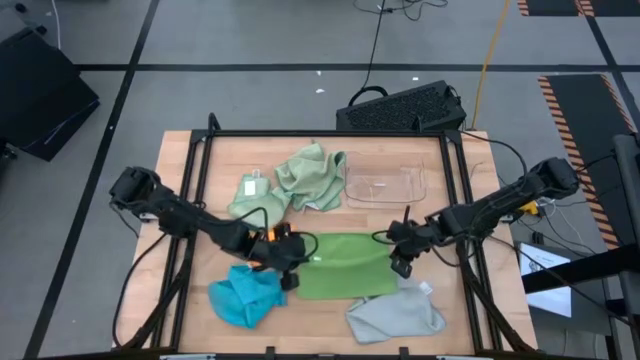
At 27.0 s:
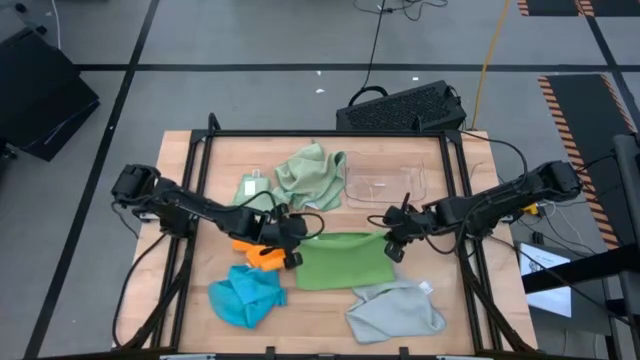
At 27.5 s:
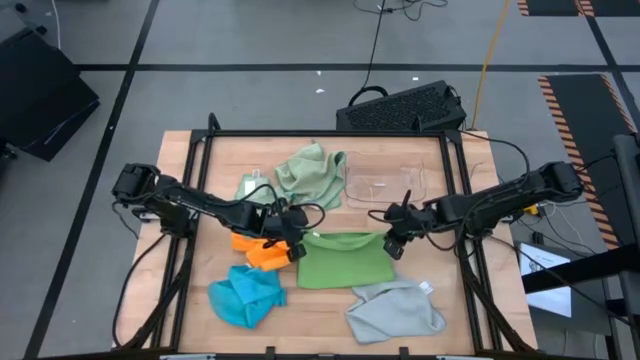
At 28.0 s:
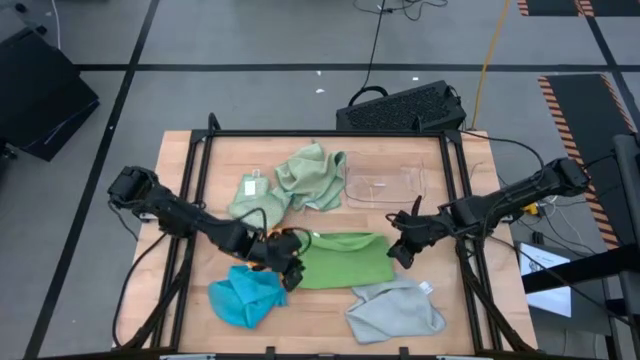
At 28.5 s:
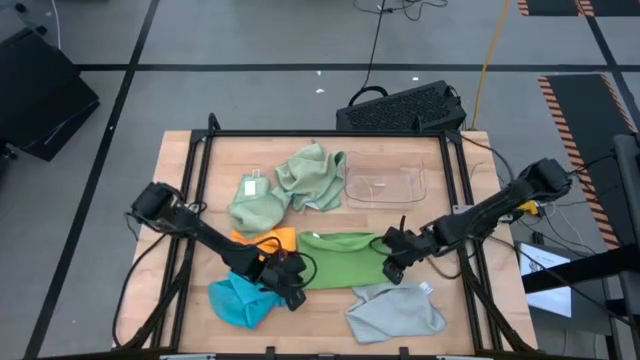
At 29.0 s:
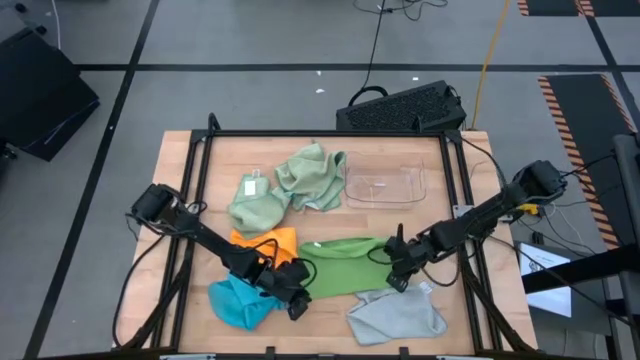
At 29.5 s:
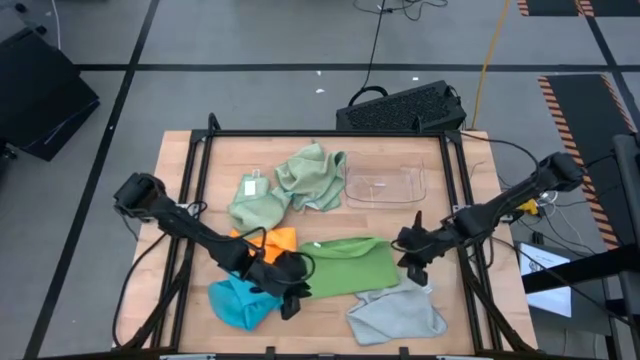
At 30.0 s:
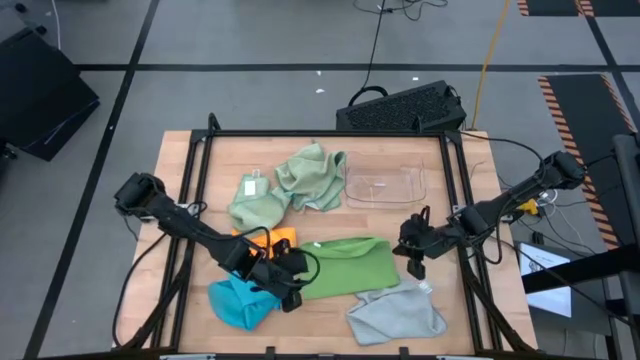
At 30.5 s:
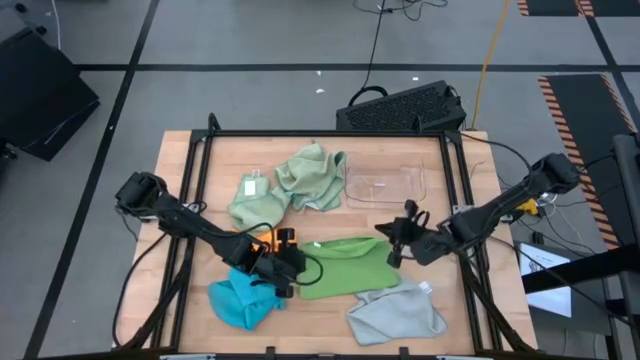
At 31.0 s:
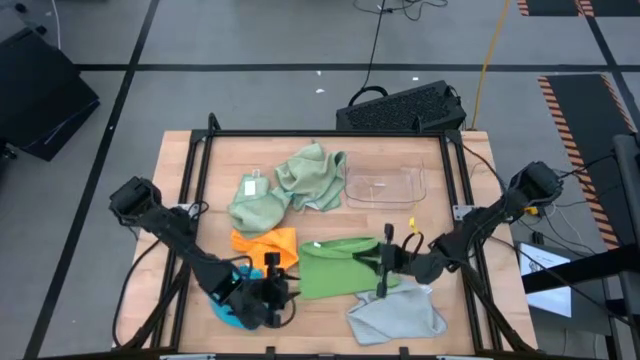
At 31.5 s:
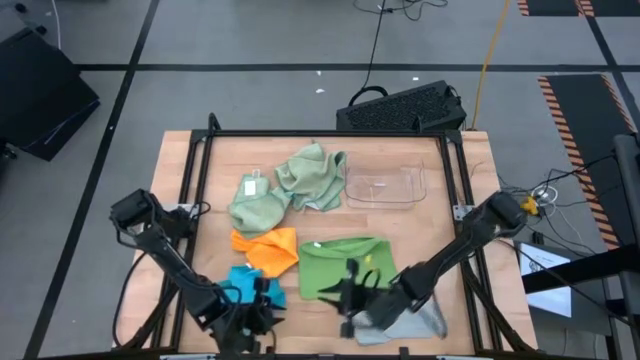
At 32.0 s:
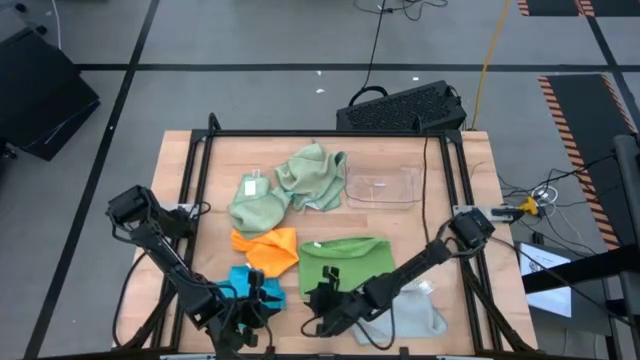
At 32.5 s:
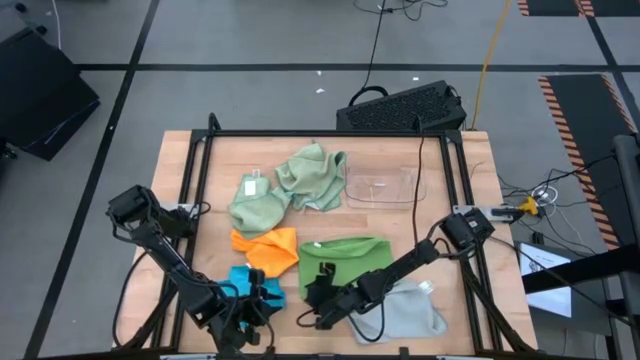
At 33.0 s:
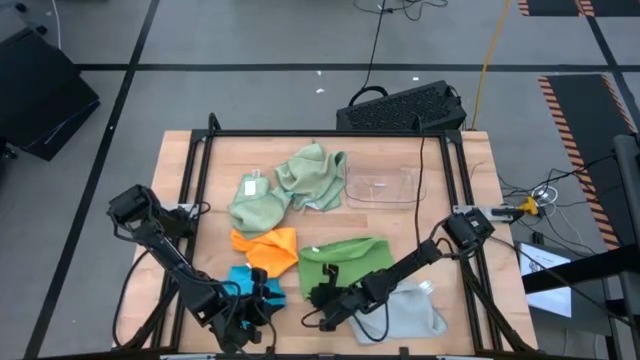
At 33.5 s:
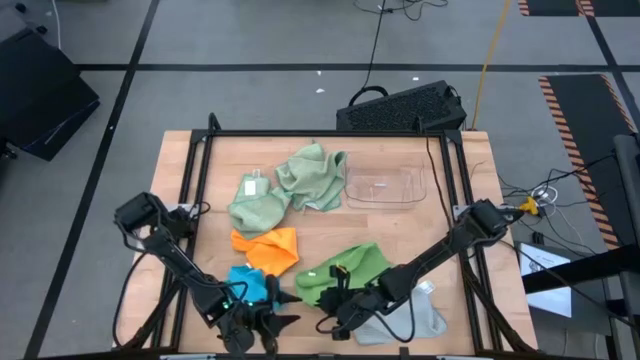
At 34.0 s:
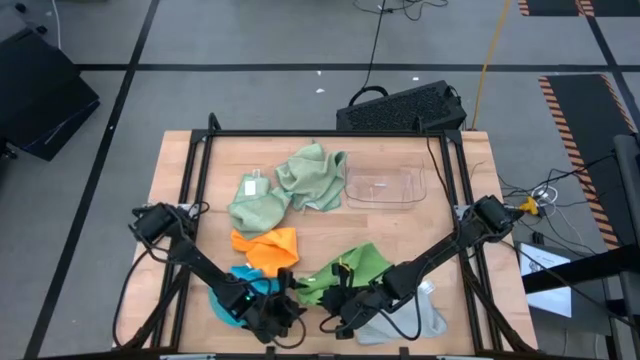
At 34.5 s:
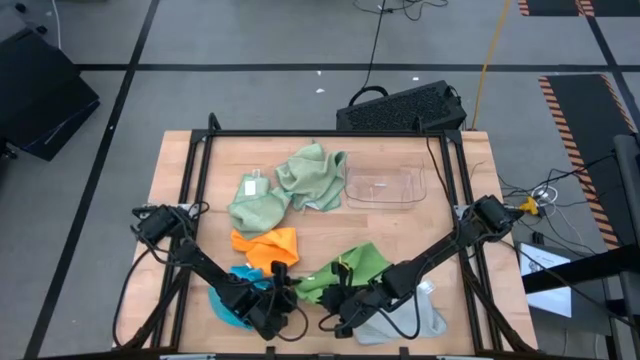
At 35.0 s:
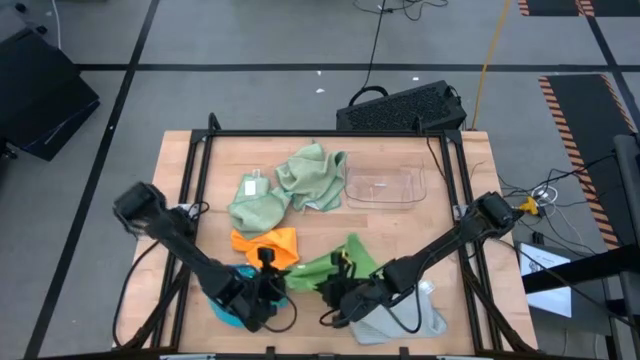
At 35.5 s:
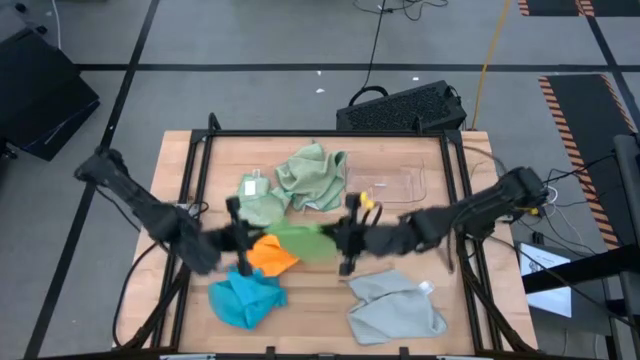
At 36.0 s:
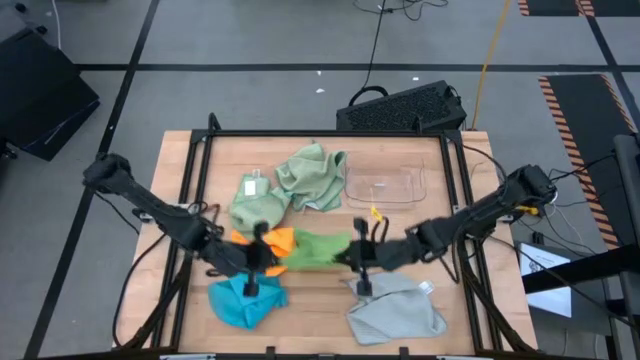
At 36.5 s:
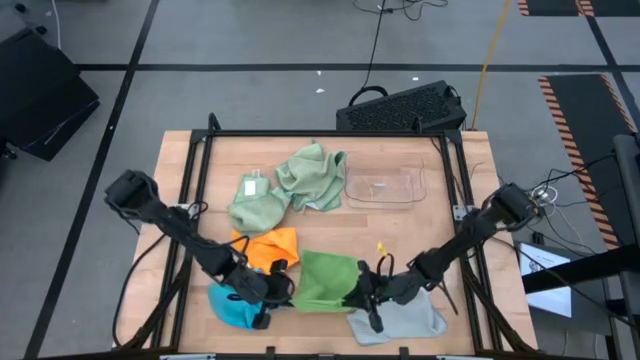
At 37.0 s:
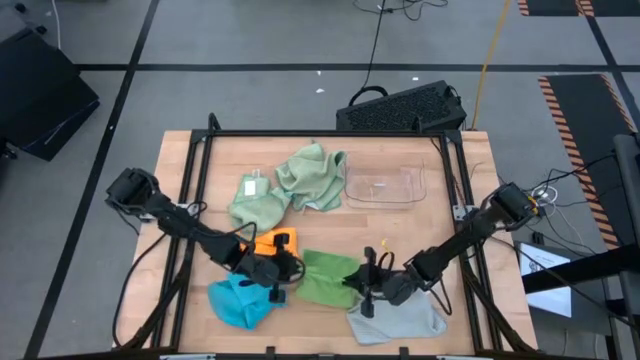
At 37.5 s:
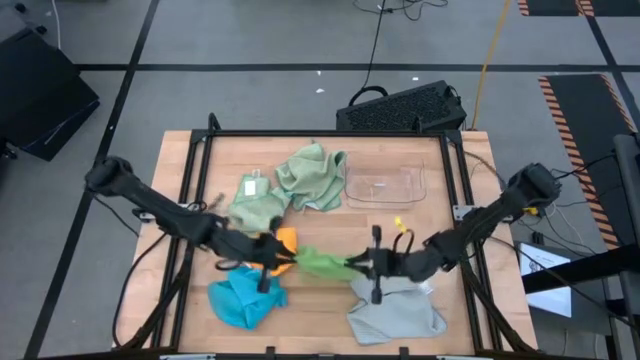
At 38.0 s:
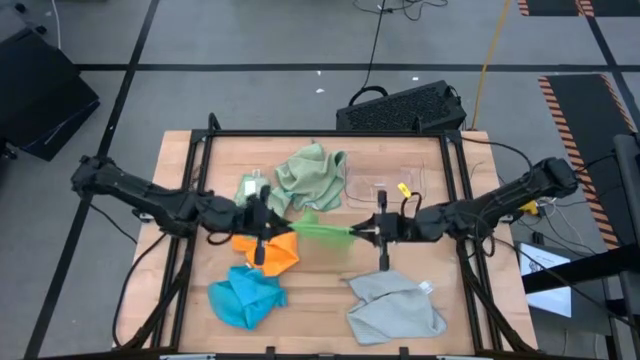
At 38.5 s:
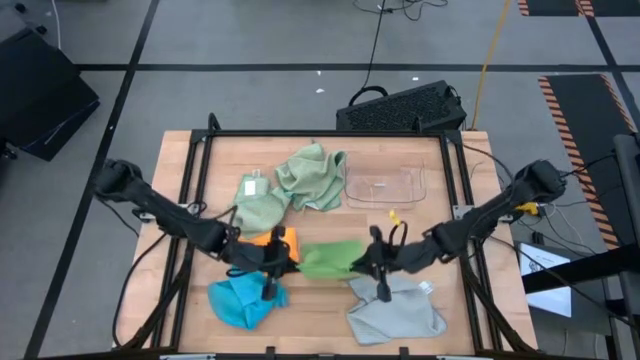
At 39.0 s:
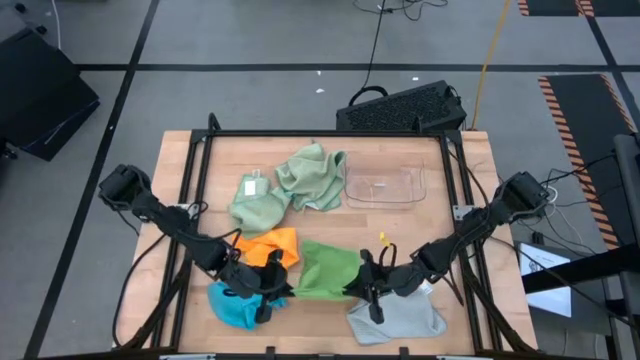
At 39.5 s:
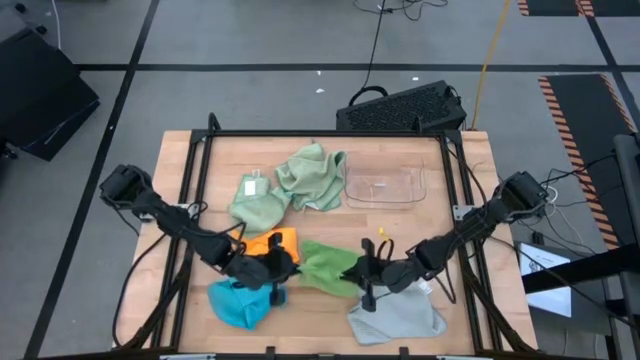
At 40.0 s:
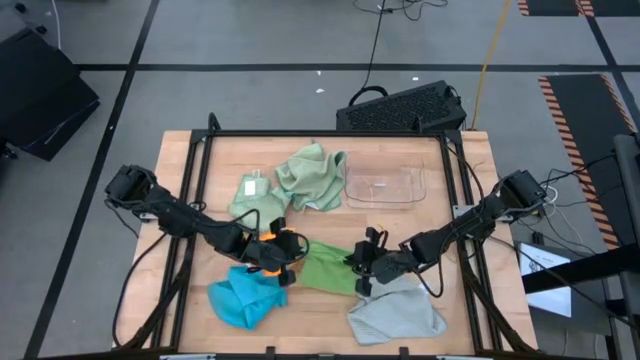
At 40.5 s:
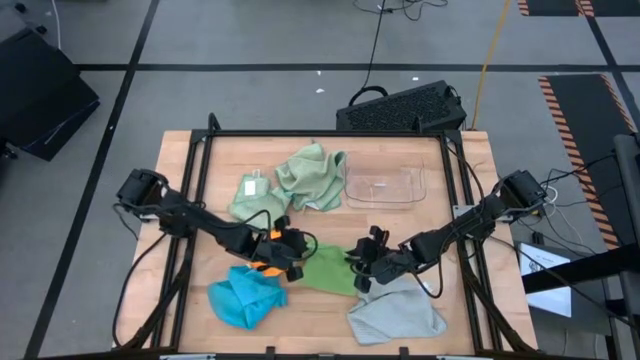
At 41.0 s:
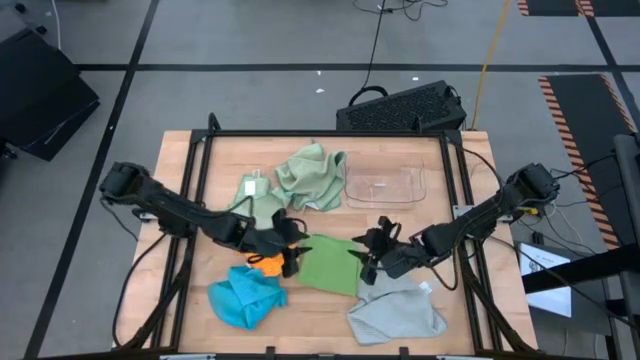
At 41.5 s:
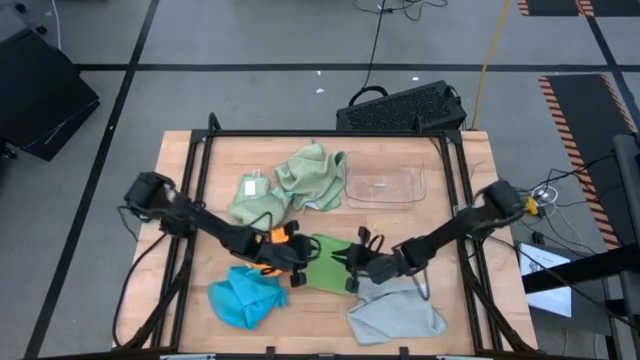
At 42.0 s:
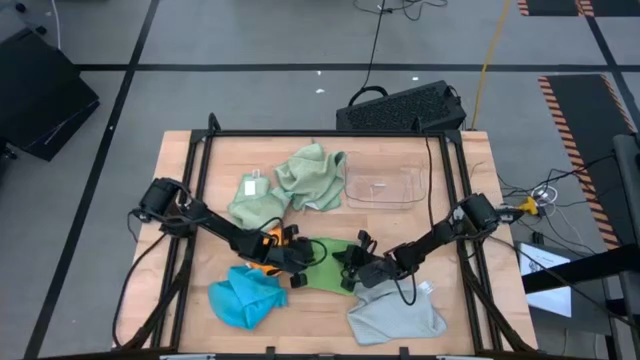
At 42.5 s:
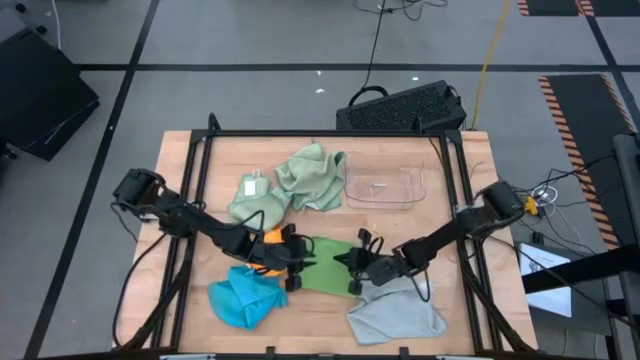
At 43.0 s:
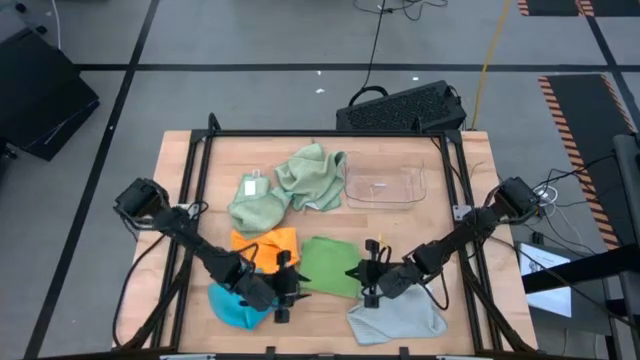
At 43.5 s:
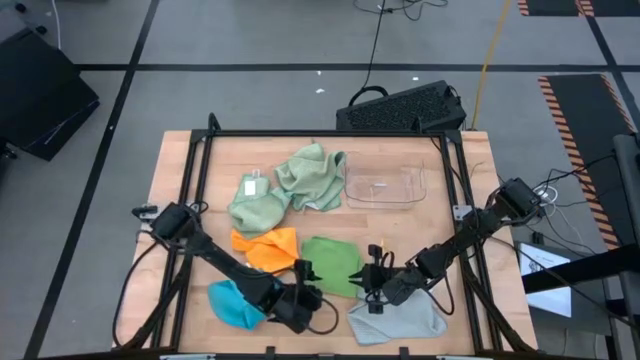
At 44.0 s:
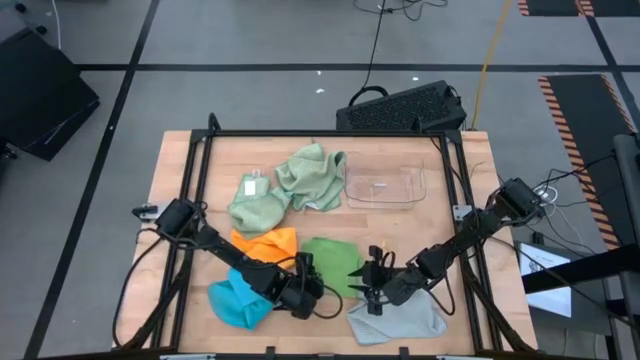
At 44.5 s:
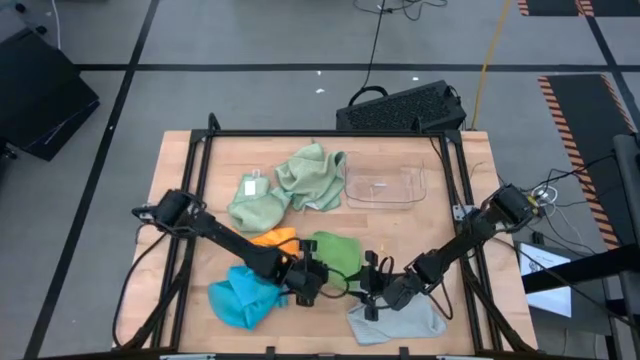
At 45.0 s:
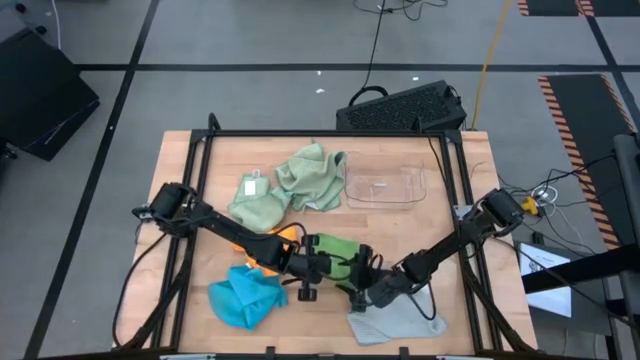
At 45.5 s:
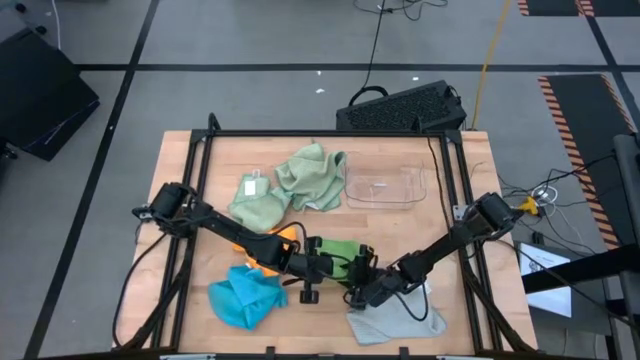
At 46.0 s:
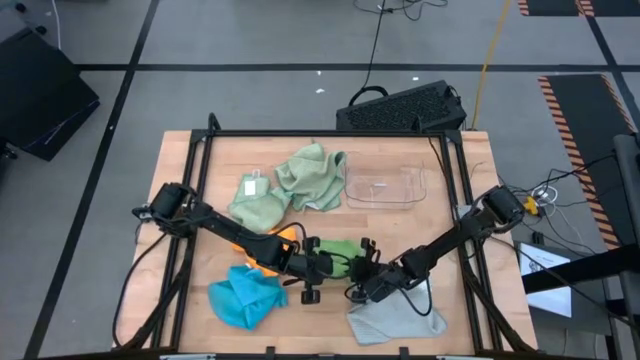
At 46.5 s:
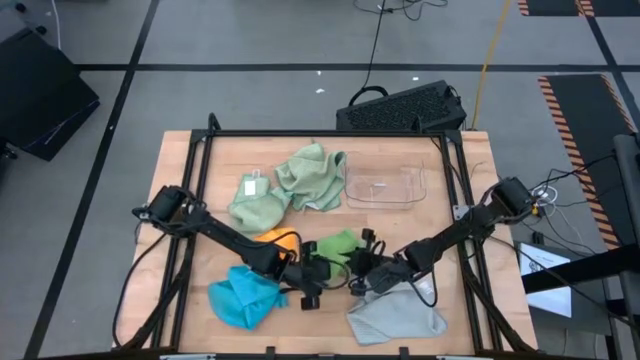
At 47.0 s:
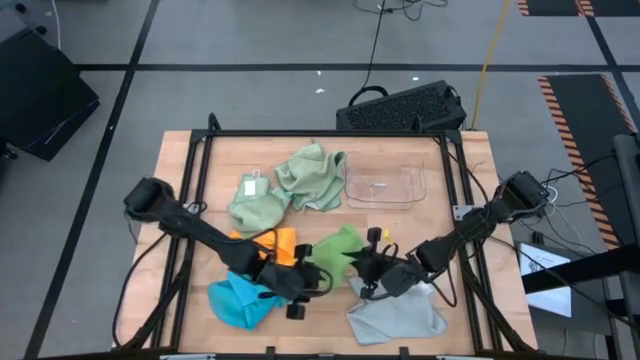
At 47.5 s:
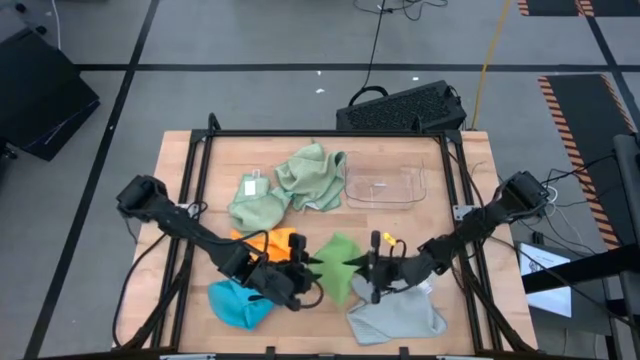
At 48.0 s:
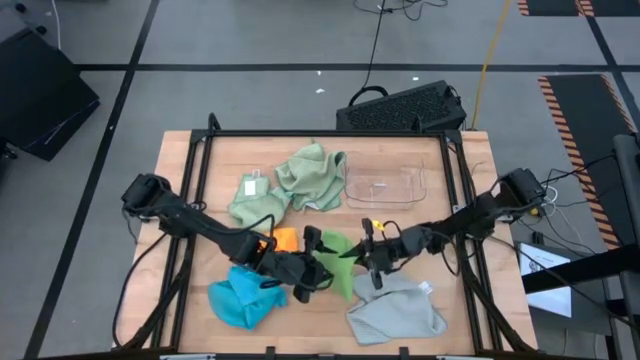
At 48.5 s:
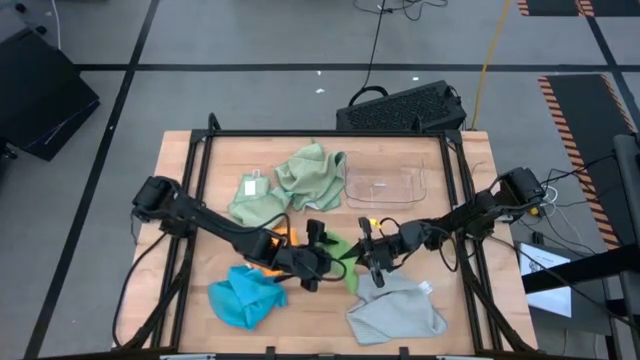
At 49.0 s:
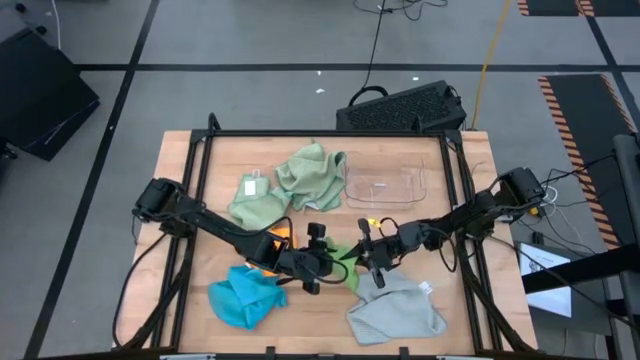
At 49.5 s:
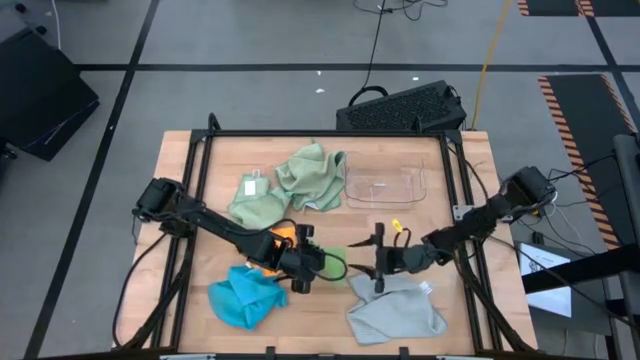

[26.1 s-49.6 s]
Task: Fold microfiber towels
Fold the green microfiber cloth
